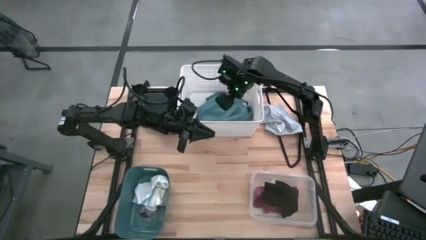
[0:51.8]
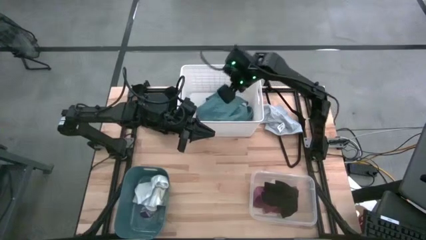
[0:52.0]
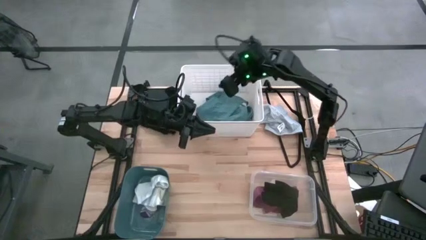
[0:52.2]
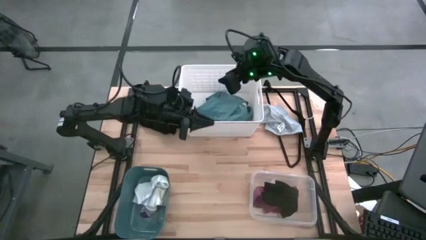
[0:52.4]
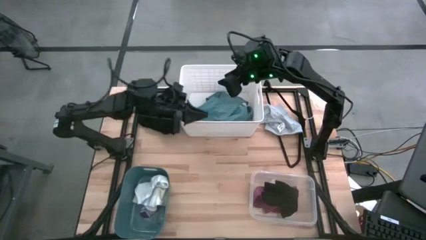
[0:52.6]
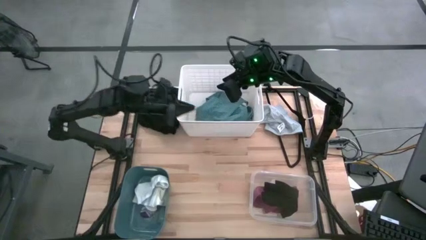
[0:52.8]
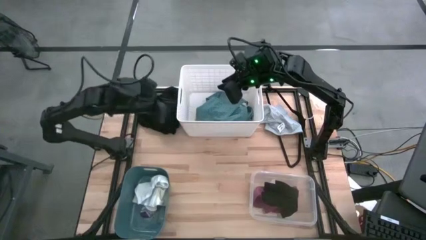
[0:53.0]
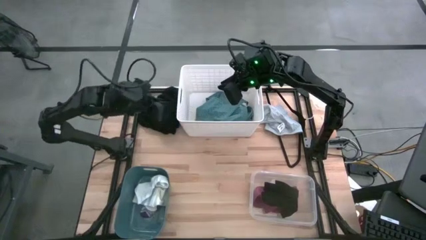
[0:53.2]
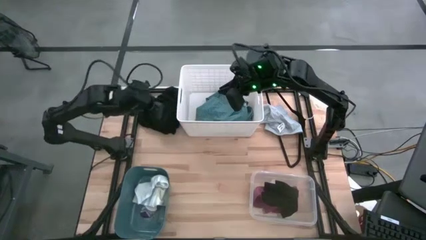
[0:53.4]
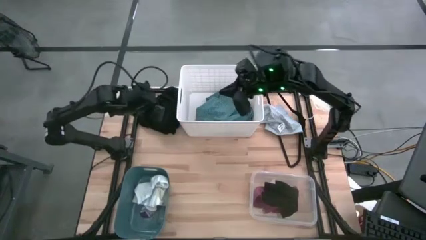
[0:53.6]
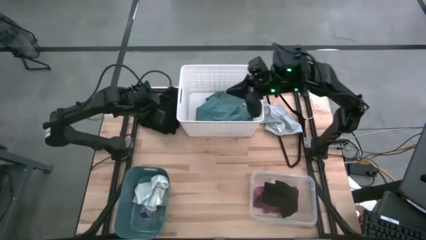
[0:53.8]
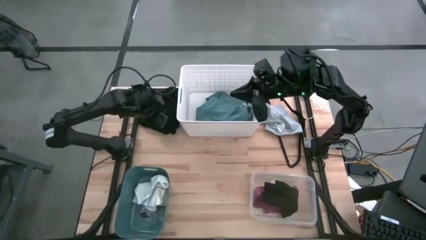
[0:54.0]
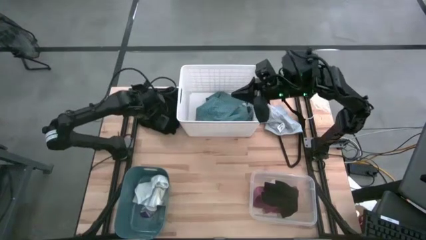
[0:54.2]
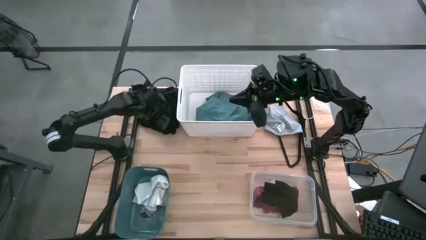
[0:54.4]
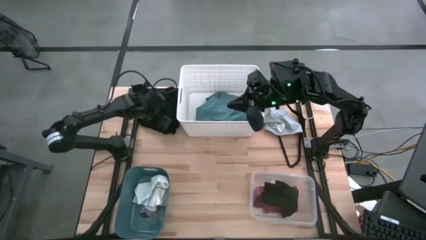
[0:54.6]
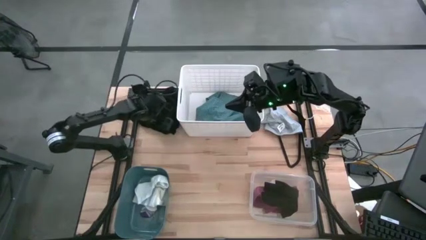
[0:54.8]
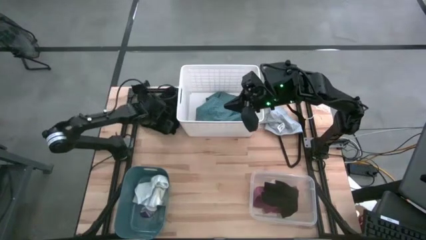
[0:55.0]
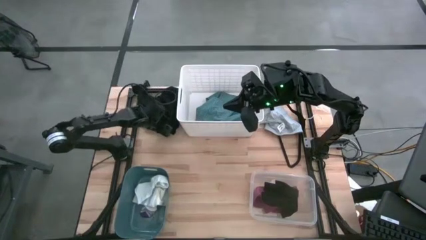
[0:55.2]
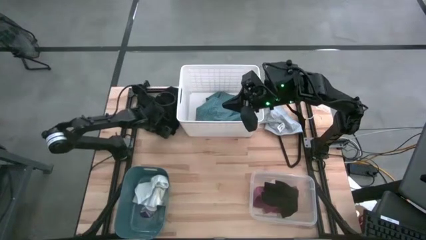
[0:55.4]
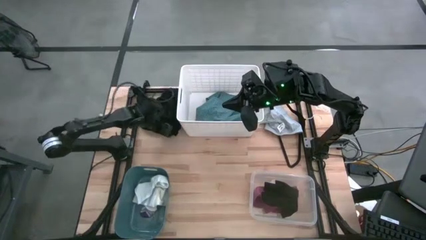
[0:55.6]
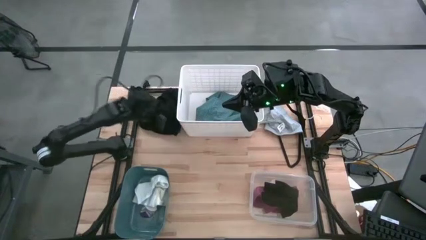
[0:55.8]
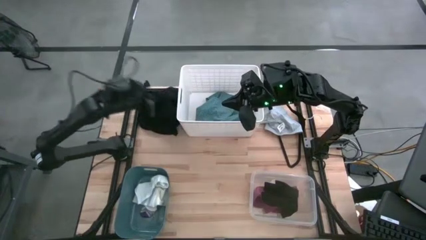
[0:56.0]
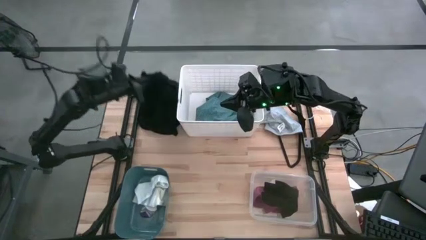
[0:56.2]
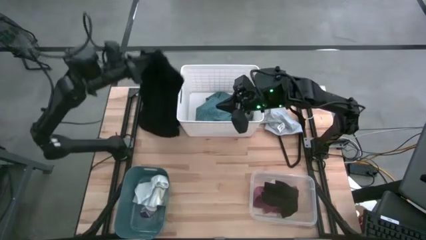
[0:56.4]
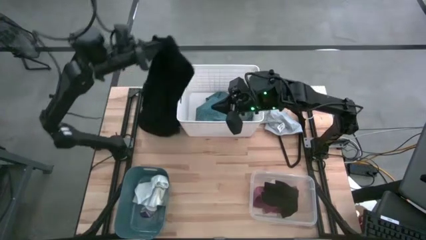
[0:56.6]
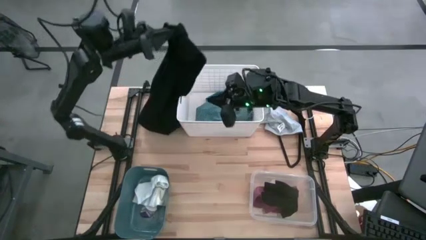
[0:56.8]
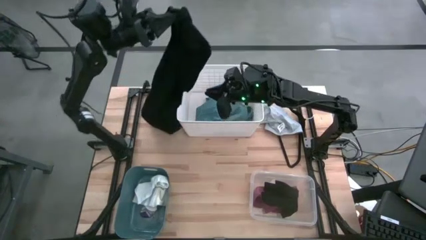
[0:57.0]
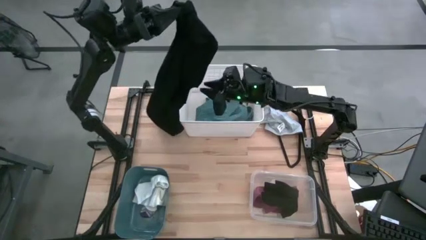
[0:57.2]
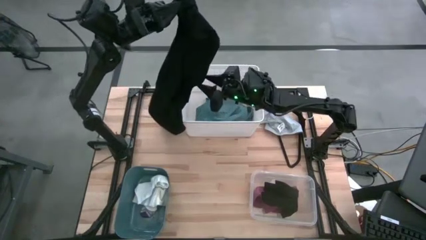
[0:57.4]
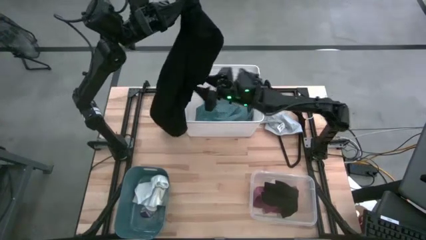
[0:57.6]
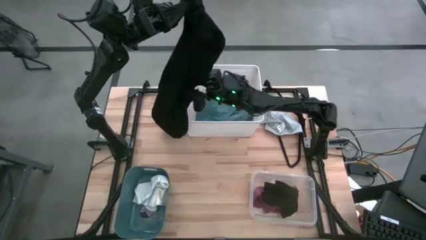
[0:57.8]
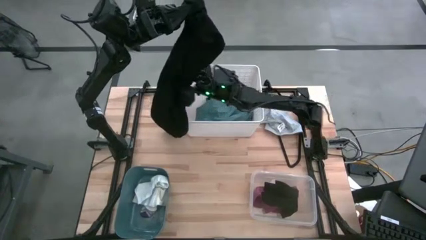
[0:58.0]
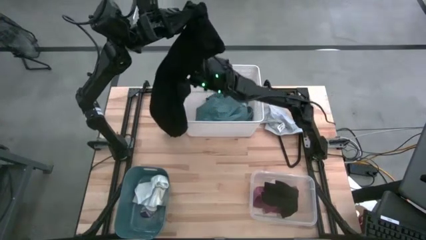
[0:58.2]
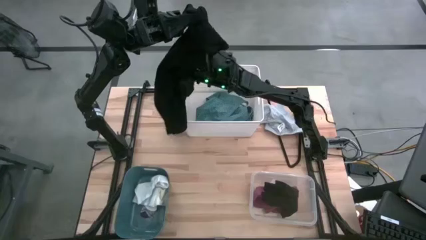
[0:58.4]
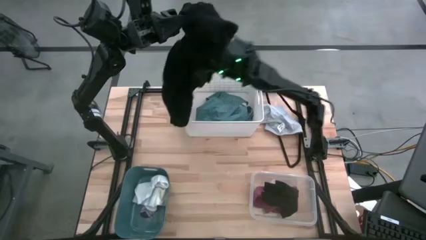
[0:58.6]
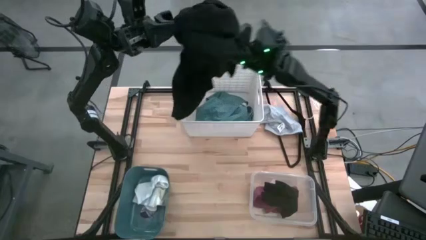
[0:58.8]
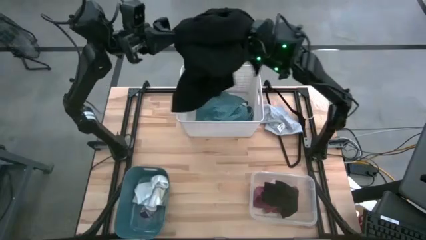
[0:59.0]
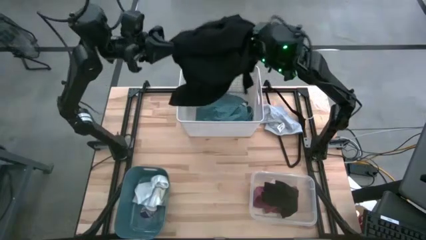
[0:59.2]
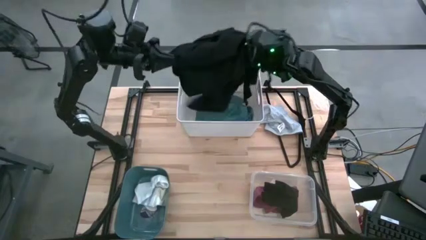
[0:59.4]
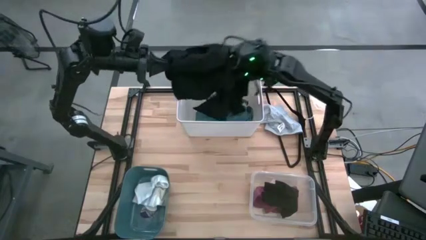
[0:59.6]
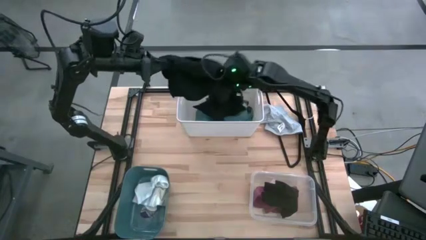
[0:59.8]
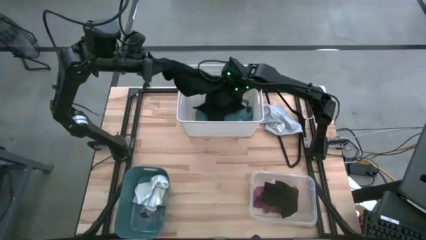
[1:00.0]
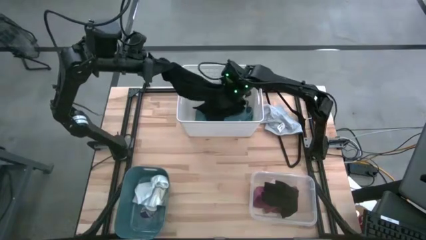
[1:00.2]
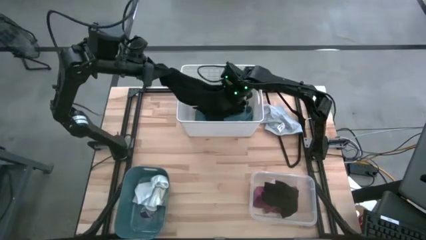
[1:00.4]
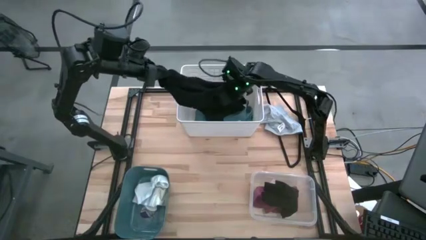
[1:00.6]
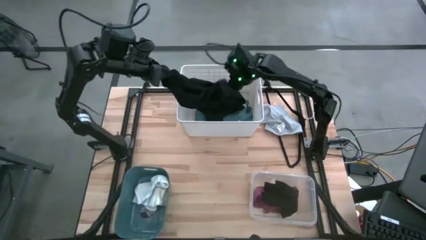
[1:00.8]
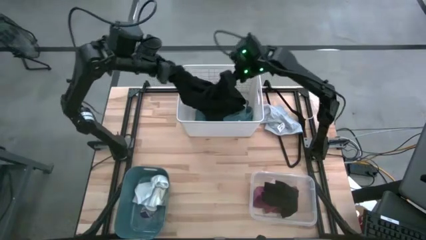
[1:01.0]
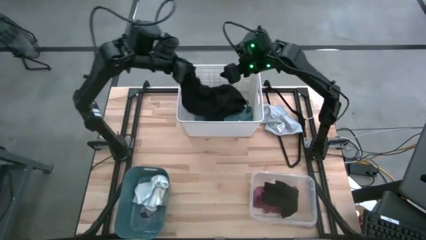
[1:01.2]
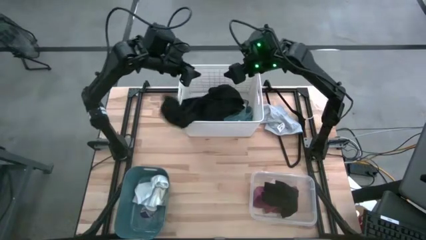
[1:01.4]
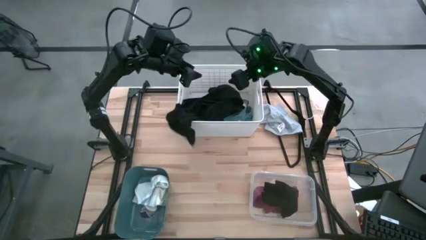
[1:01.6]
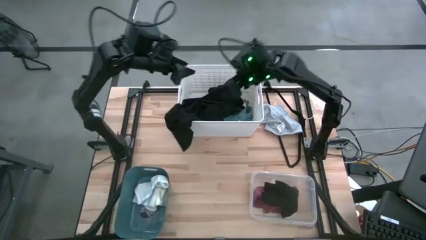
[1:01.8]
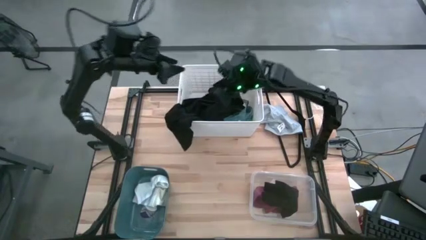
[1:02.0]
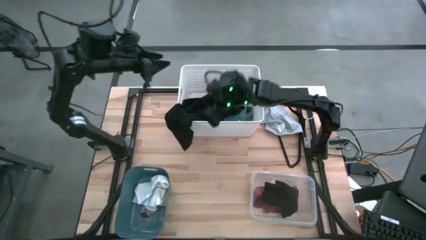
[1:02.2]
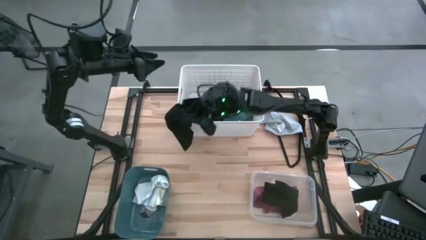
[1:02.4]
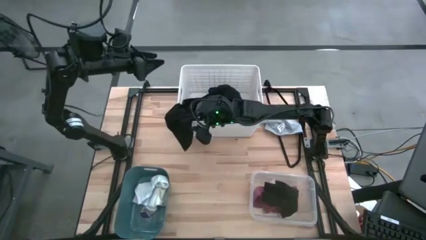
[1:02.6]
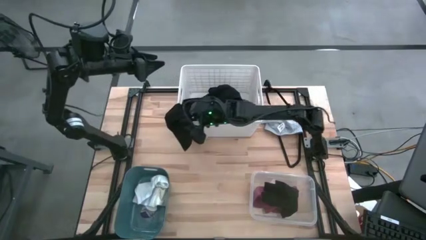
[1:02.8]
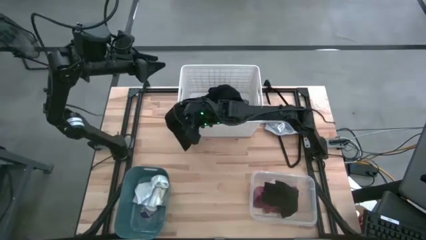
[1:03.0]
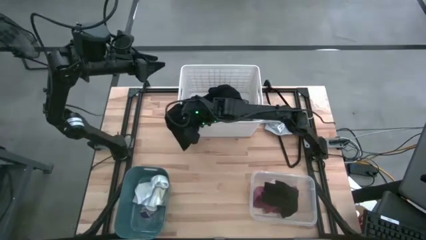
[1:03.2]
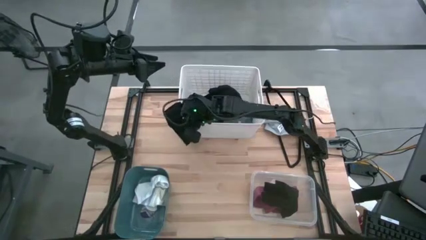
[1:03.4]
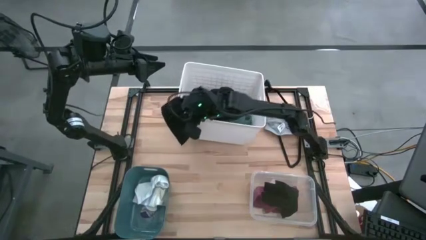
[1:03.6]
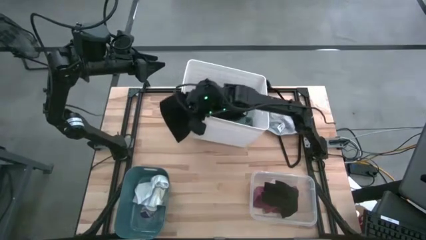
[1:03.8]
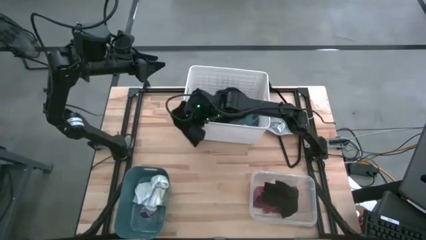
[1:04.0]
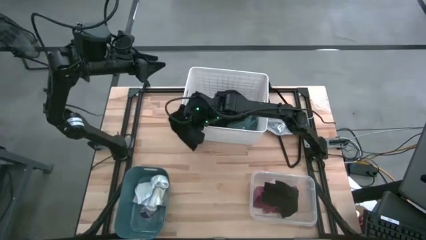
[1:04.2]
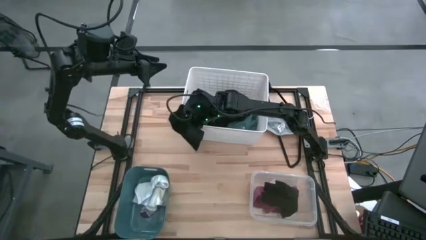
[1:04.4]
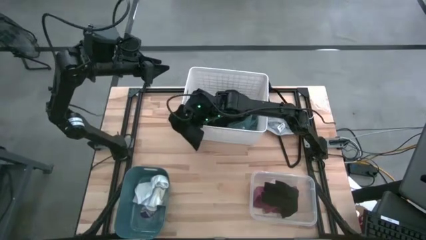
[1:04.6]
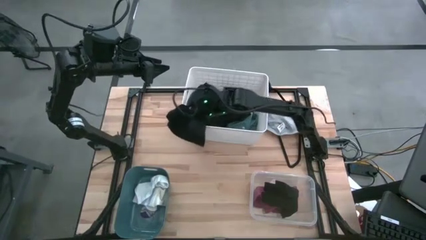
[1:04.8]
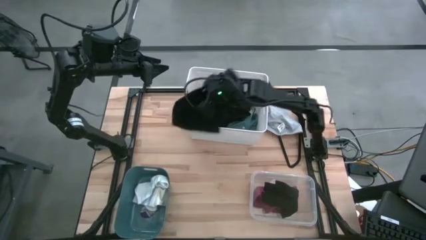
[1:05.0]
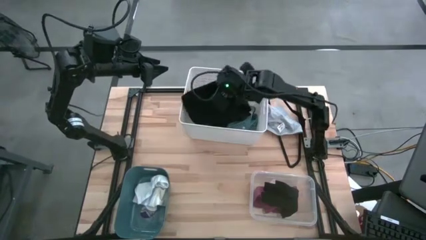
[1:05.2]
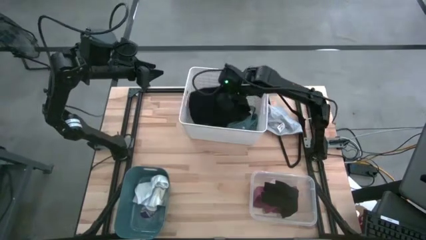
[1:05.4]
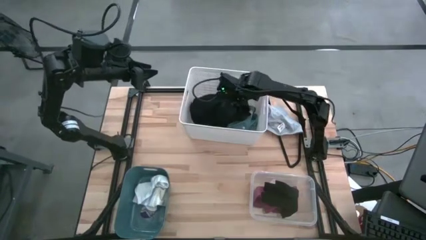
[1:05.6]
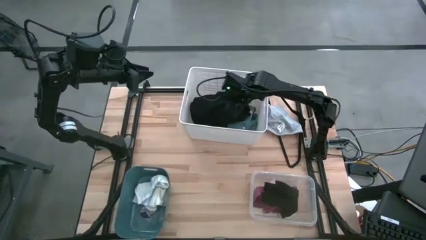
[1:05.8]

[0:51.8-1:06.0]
Task: Pick & Place Cloths
Put the black shirt into the white bin
